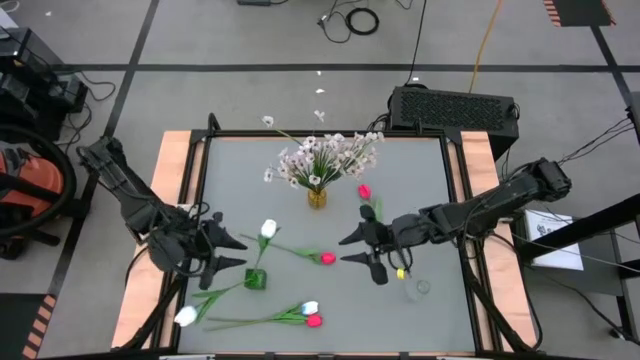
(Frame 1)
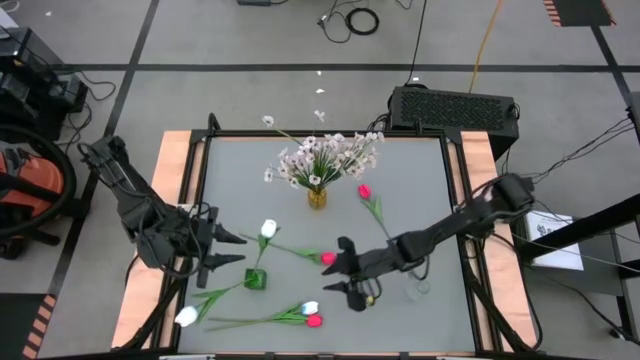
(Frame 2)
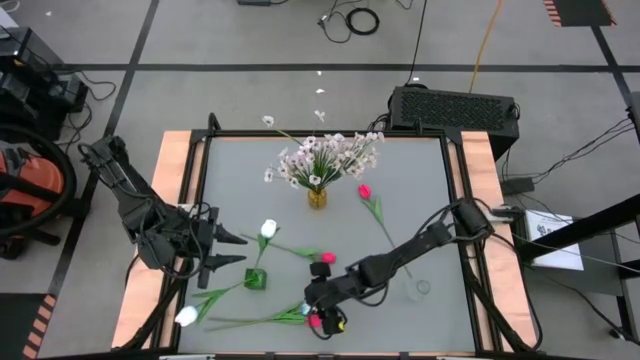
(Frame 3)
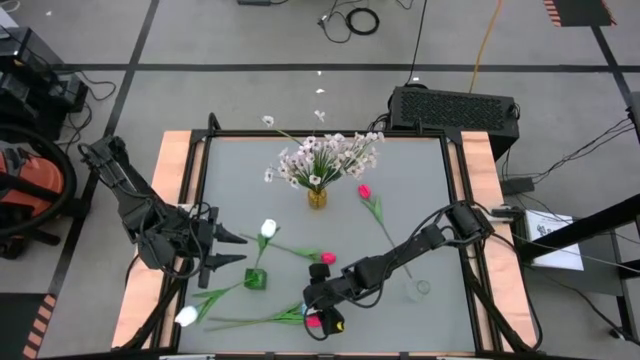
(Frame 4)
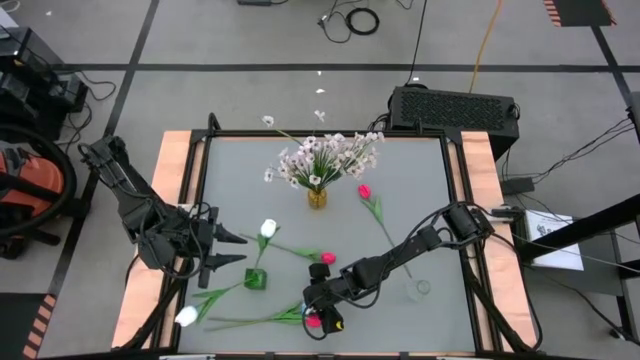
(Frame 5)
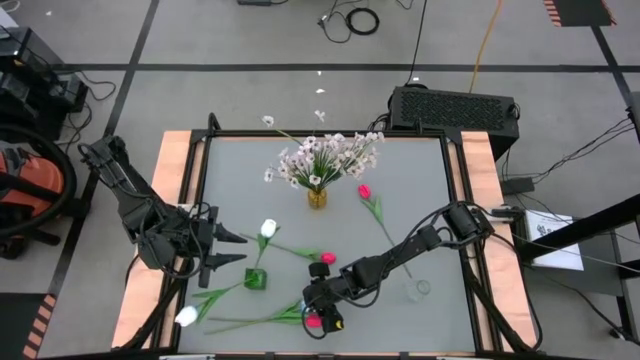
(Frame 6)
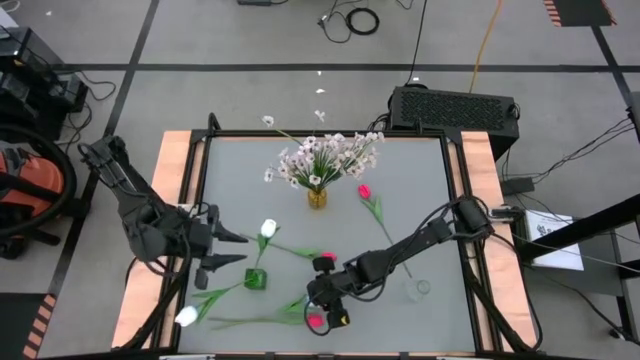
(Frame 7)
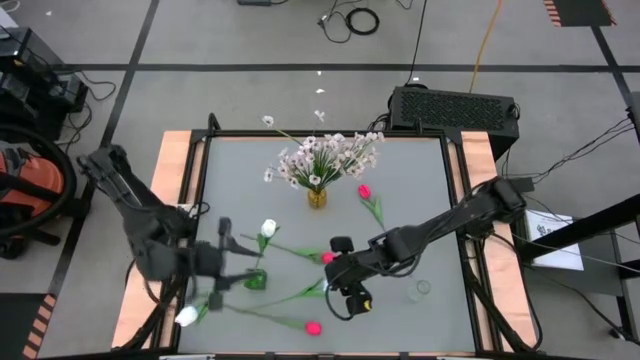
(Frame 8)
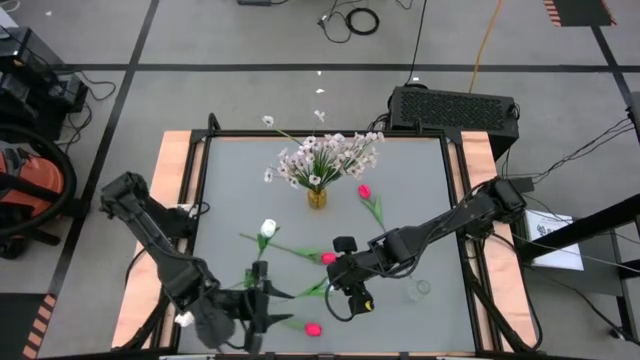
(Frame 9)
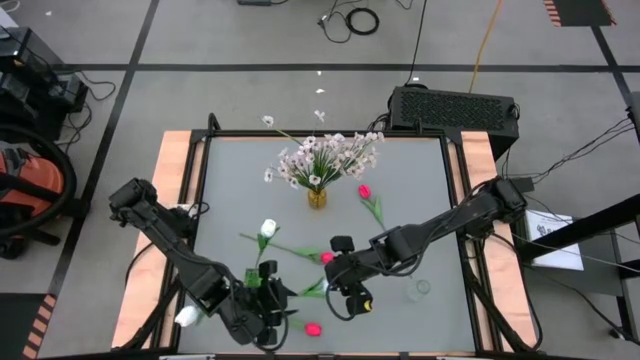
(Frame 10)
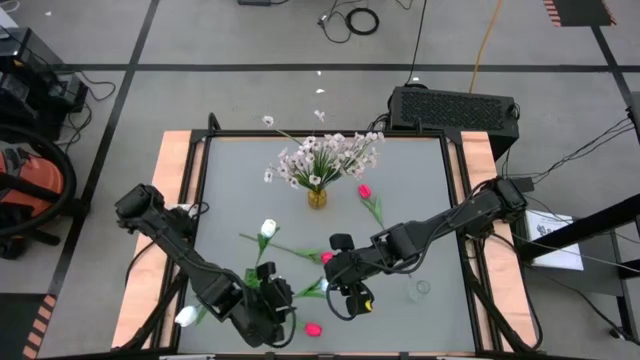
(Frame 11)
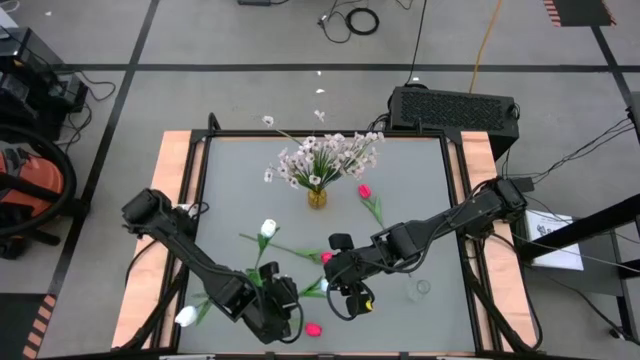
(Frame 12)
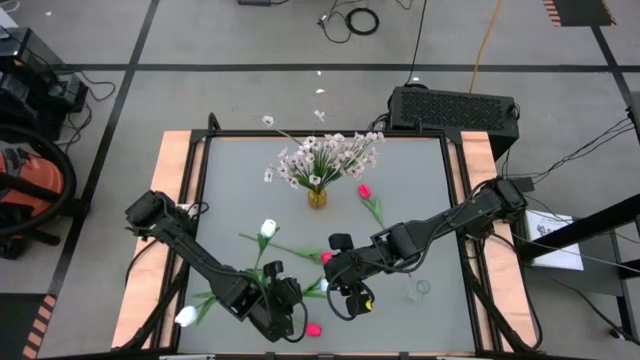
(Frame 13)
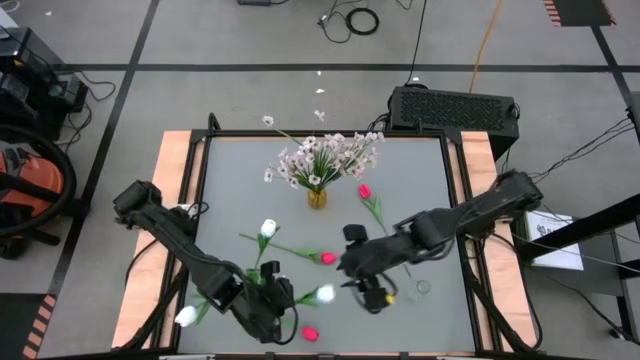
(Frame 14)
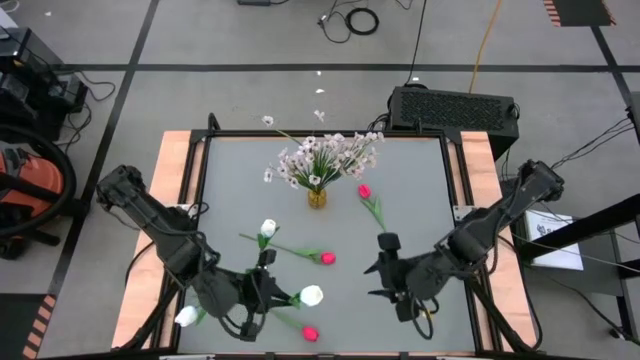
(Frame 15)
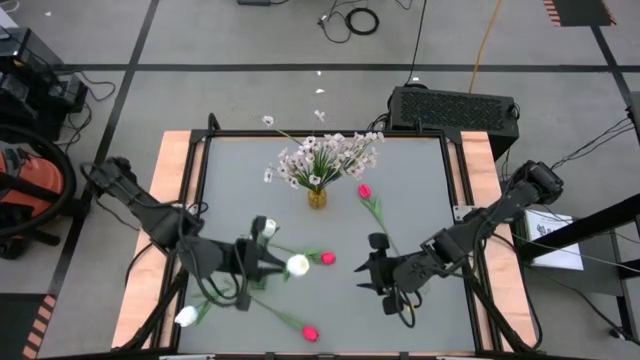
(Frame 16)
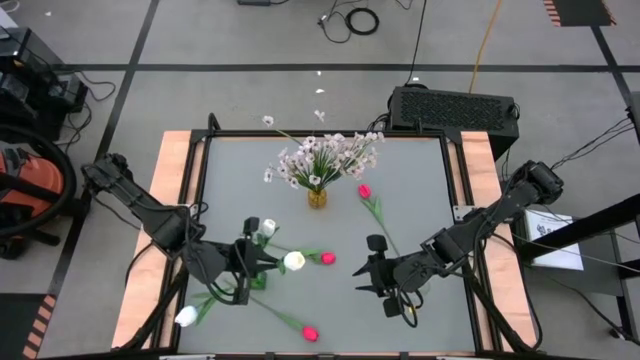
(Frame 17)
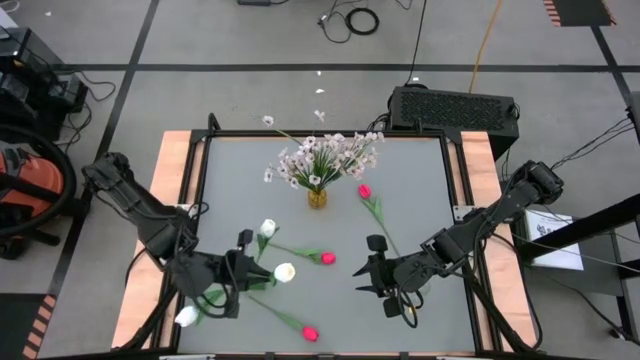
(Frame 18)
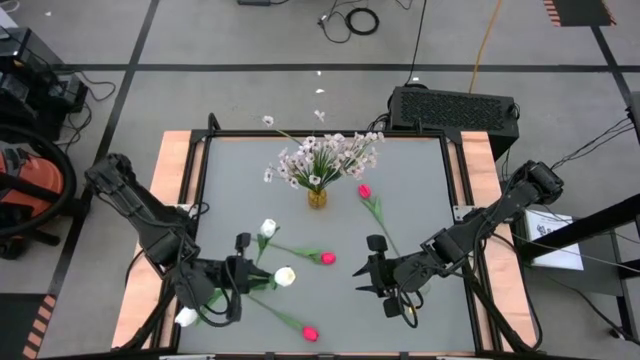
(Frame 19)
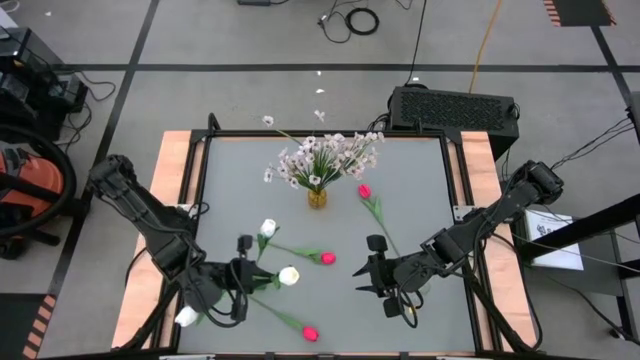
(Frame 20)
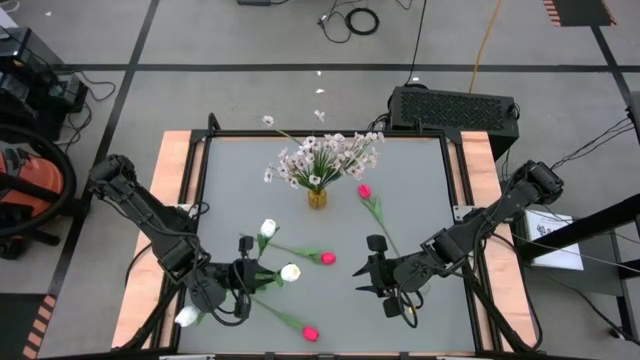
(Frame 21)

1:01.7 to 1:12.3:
Task: Sort flowers into vase by color
Put the white flower into the green vase

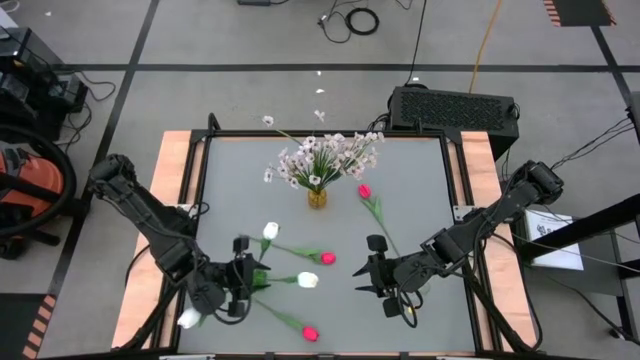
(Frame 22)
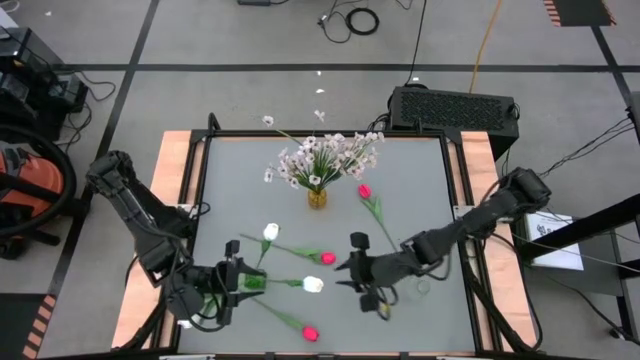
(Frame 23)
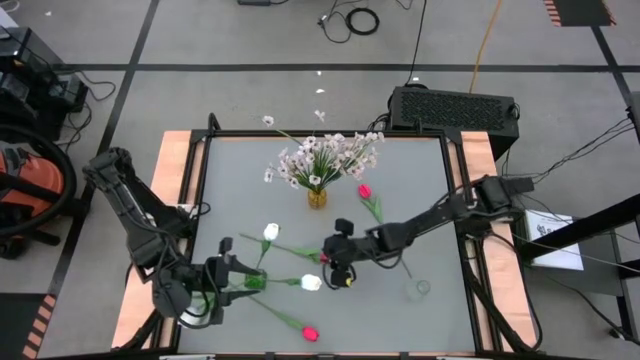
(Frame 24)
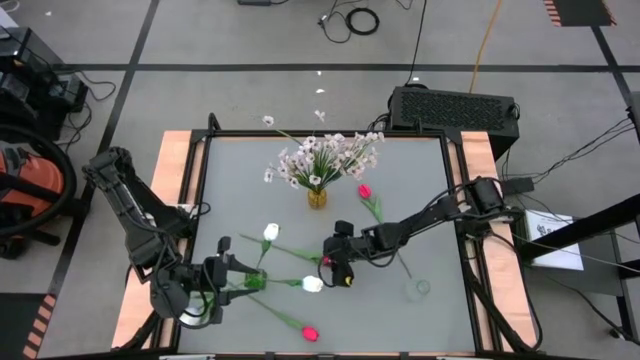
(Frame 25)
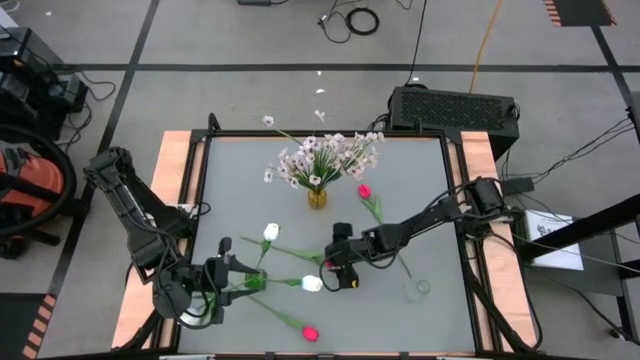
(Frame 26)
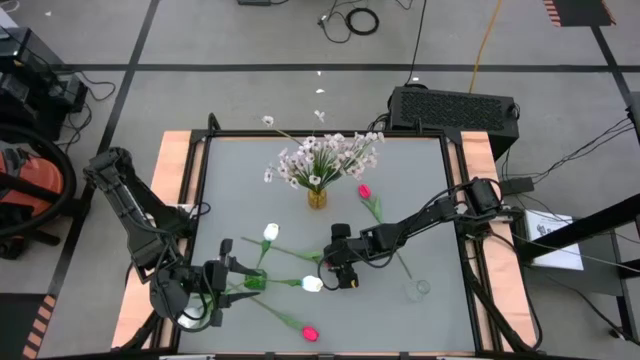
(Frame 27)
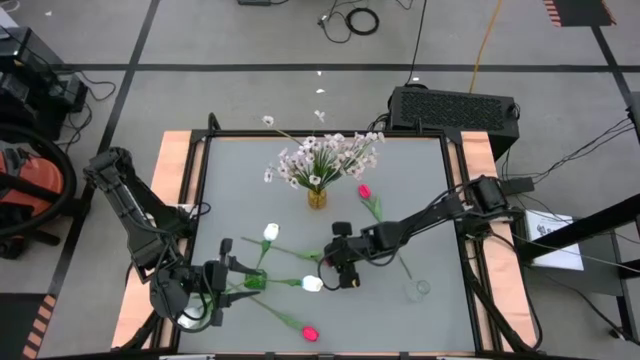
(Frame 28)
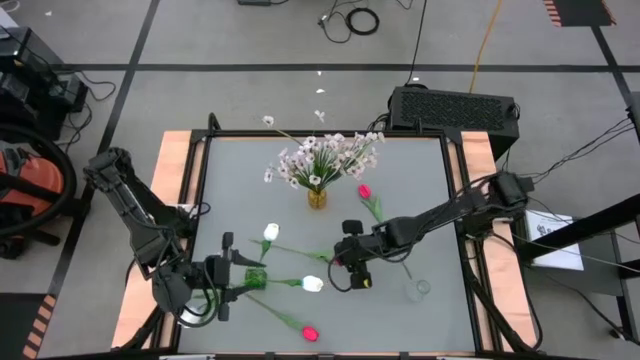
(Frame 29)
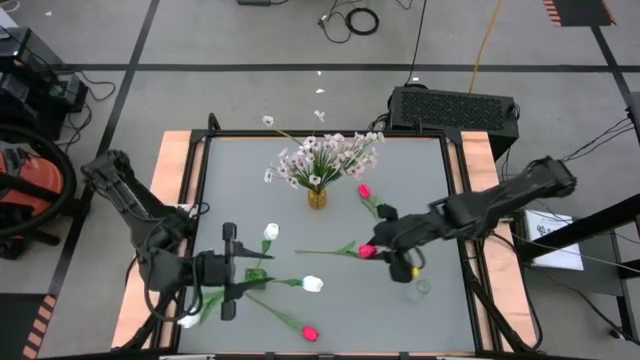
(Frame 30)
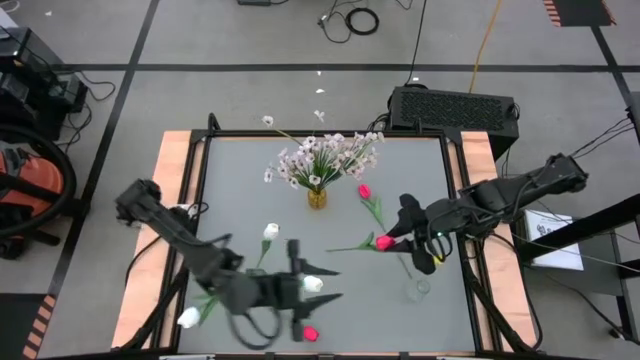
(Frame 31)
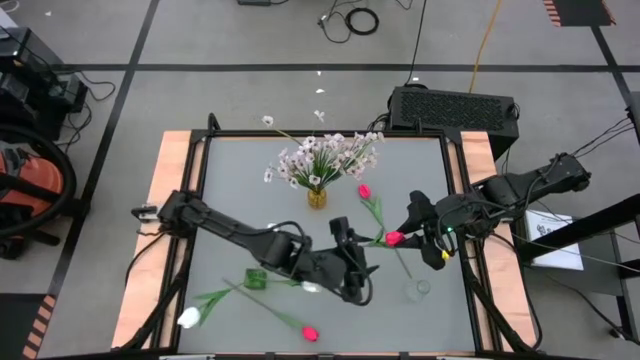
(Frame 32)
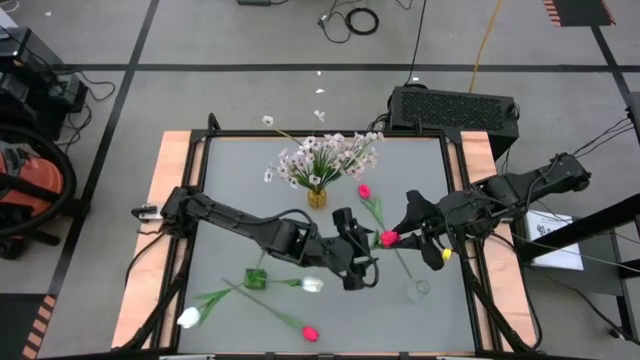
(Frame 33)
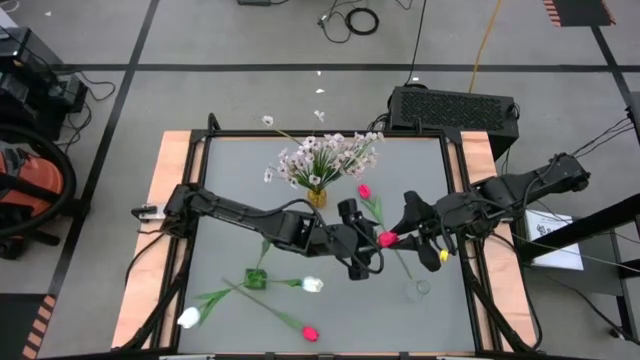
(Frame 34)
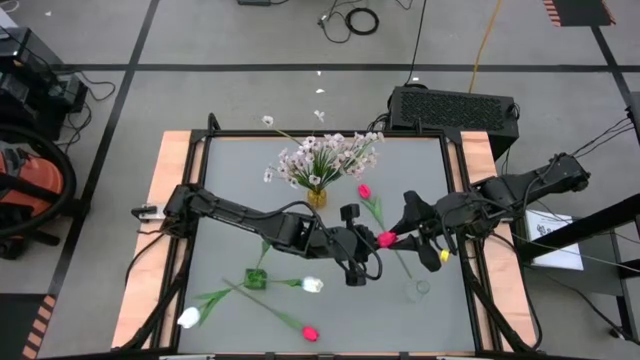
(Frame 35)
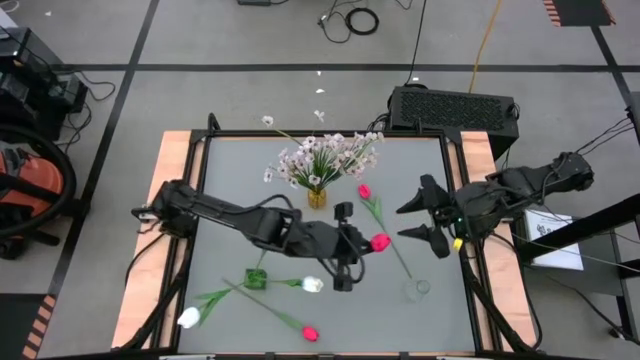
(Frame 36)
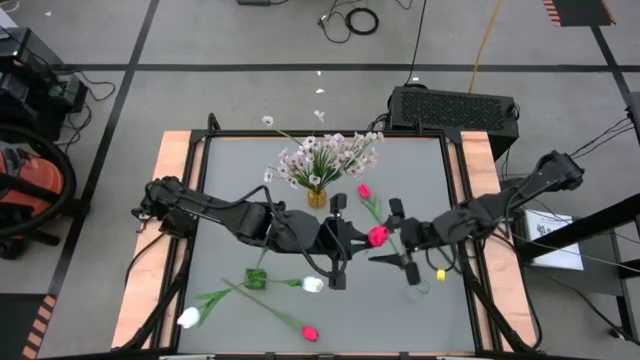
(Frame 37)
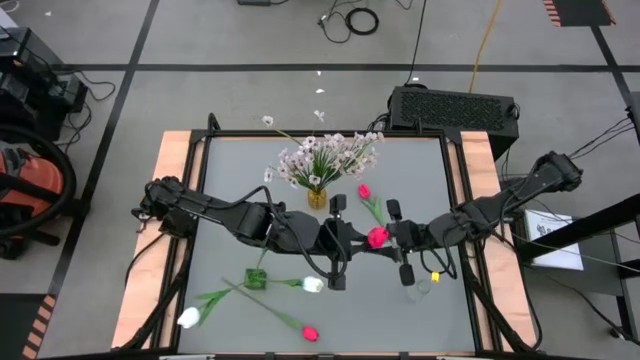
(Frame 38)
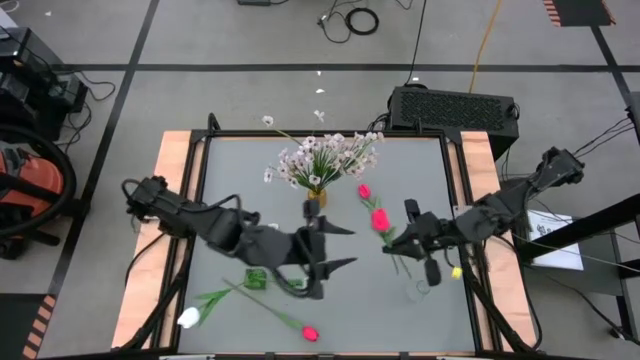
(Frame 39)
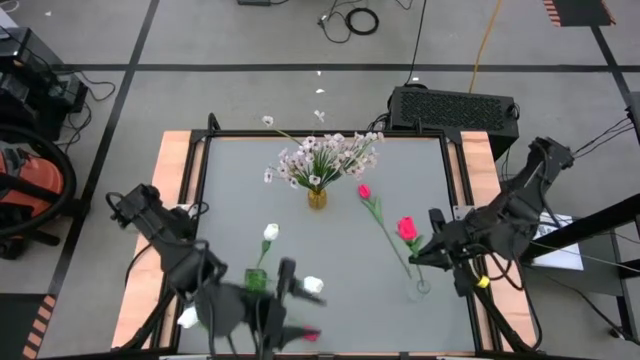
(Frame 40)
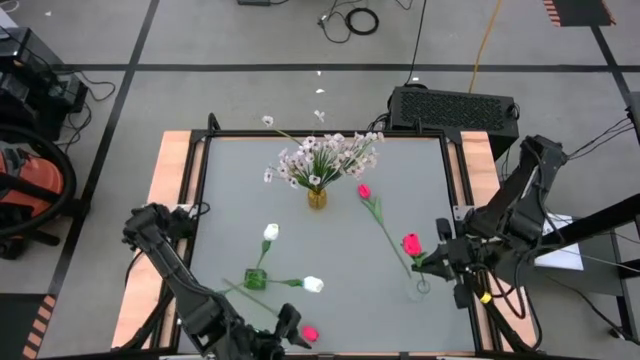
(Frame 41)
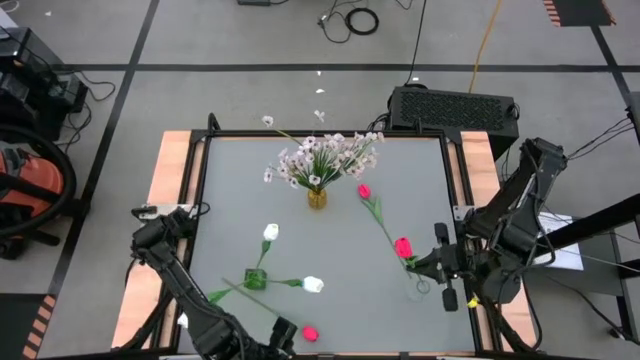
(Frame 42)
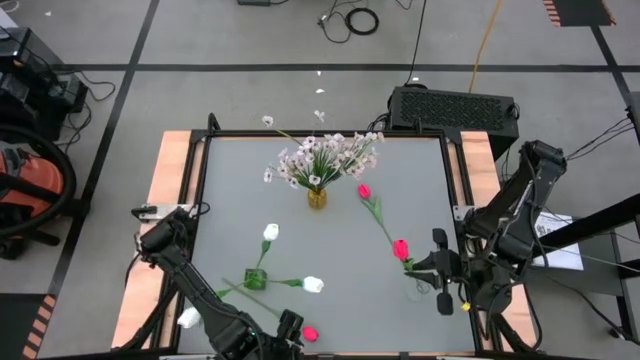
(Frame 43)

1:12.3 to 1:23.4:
Put the center red flower into the transparent vase
